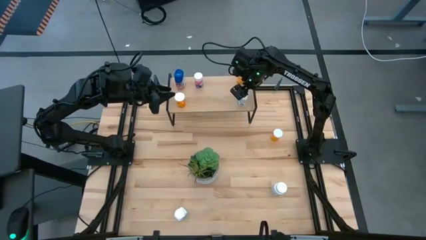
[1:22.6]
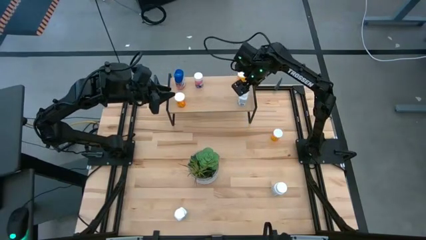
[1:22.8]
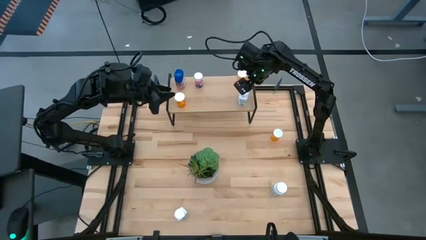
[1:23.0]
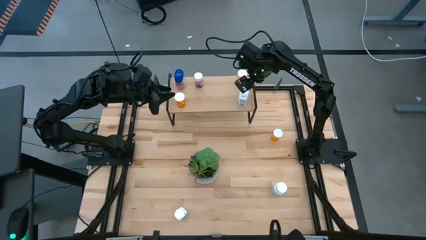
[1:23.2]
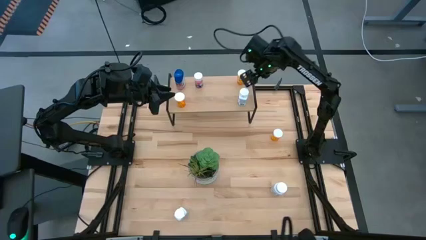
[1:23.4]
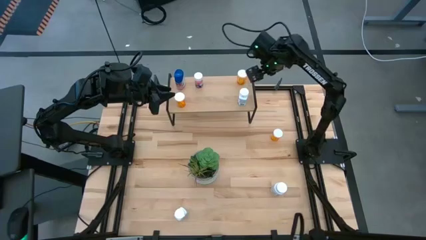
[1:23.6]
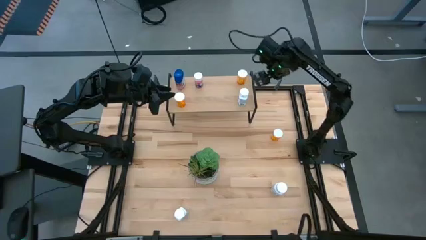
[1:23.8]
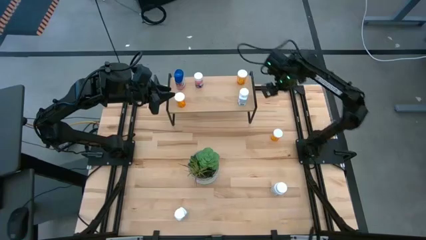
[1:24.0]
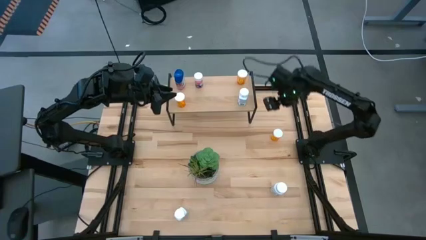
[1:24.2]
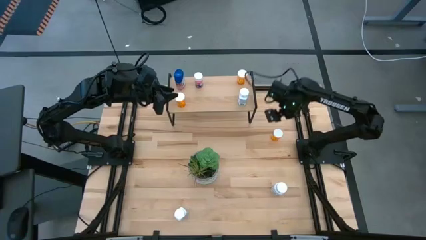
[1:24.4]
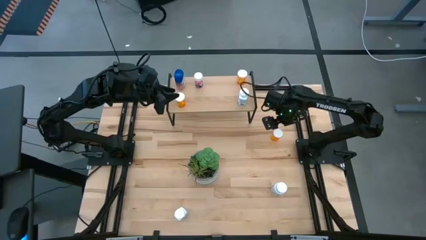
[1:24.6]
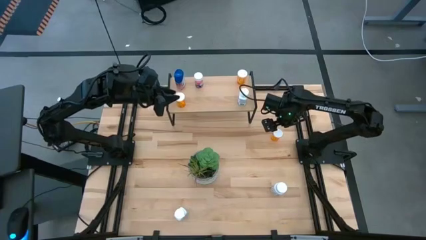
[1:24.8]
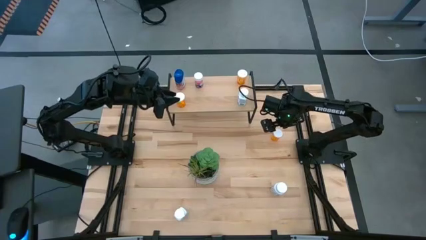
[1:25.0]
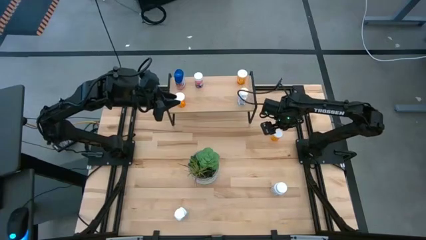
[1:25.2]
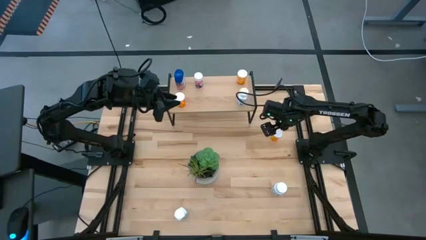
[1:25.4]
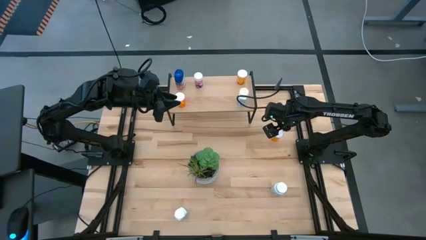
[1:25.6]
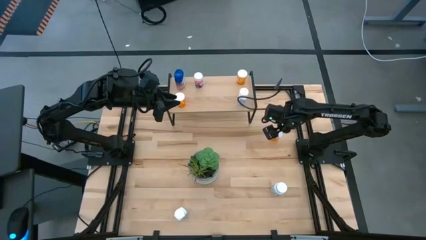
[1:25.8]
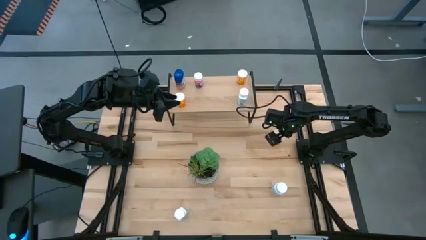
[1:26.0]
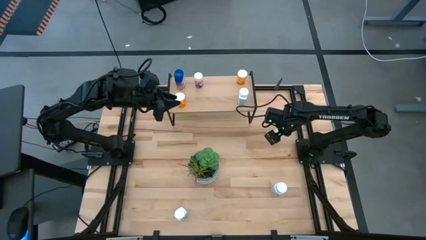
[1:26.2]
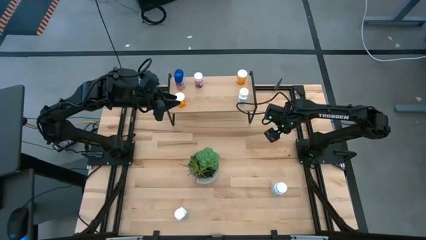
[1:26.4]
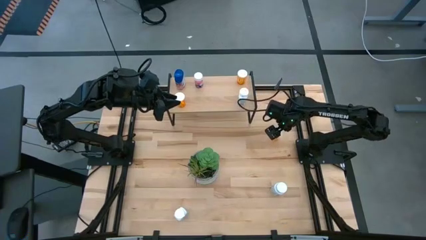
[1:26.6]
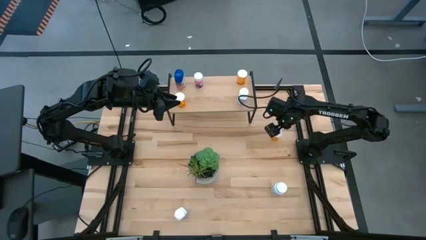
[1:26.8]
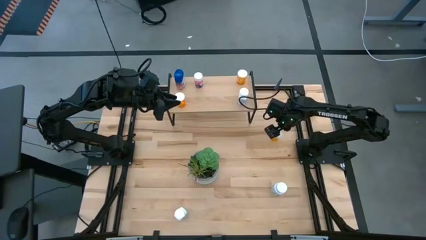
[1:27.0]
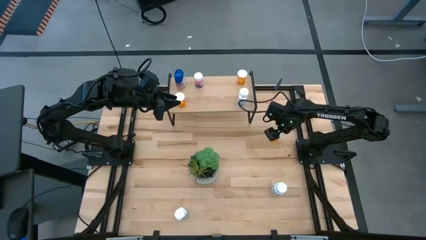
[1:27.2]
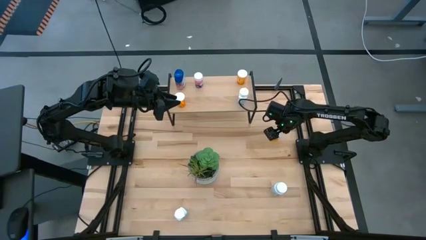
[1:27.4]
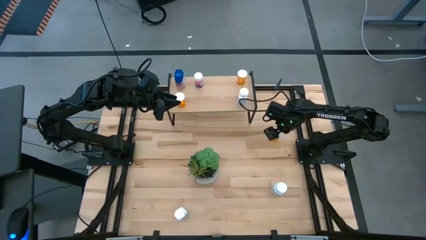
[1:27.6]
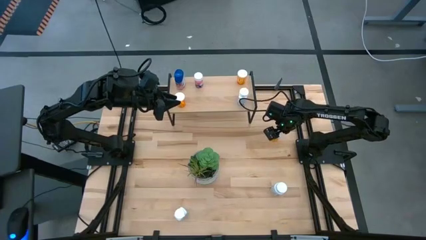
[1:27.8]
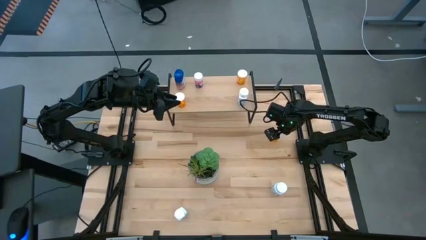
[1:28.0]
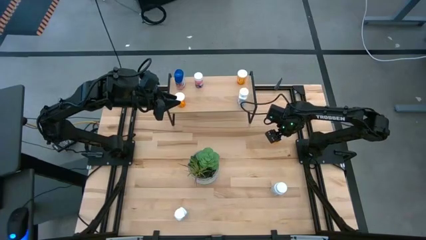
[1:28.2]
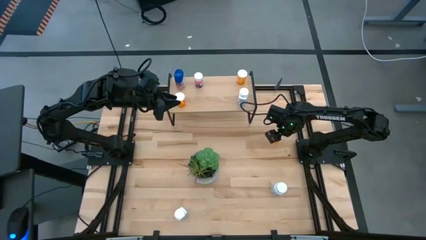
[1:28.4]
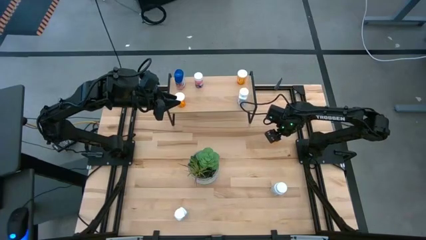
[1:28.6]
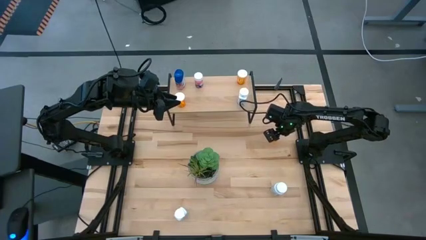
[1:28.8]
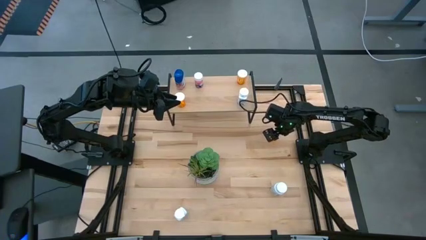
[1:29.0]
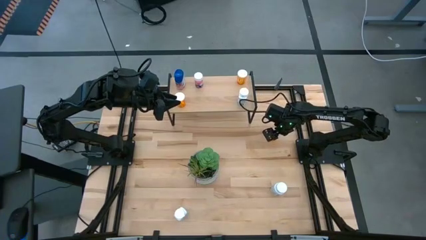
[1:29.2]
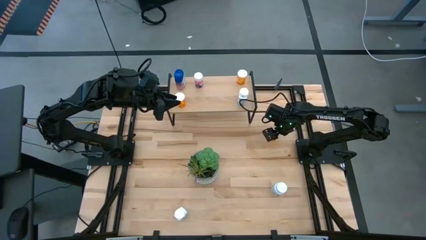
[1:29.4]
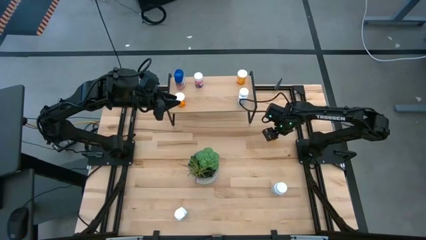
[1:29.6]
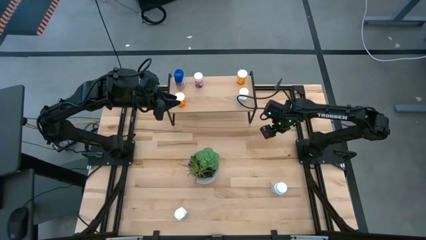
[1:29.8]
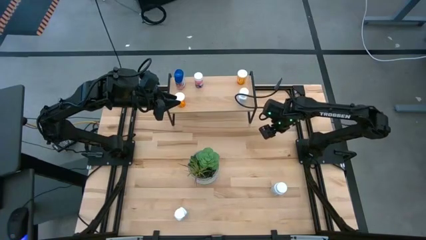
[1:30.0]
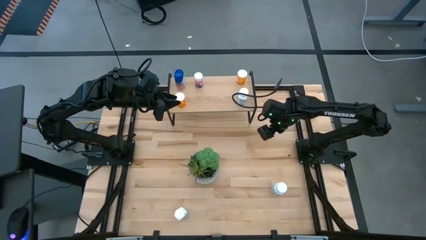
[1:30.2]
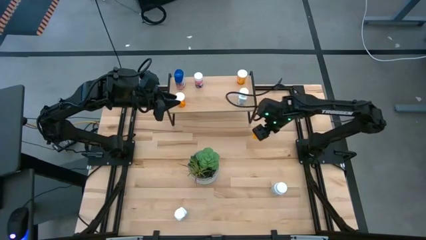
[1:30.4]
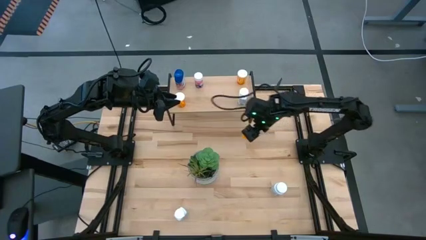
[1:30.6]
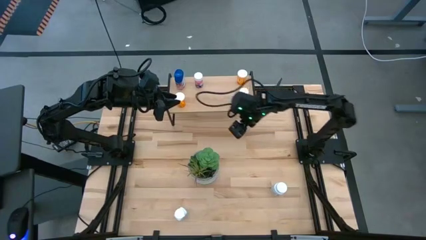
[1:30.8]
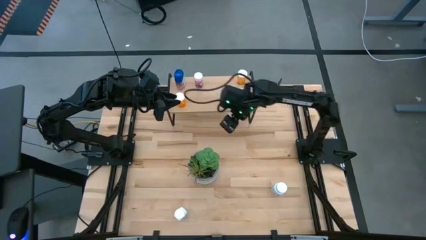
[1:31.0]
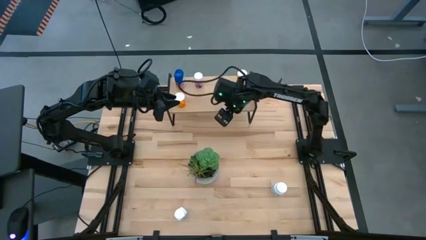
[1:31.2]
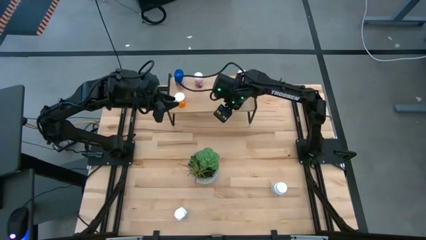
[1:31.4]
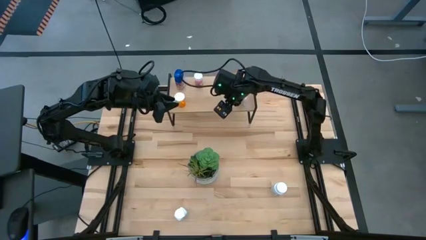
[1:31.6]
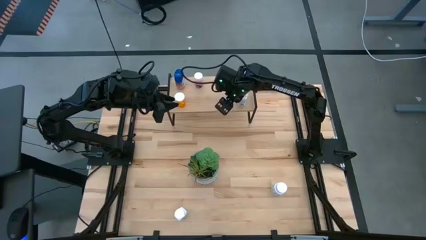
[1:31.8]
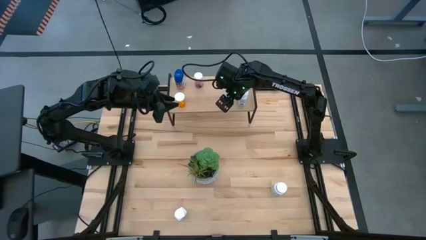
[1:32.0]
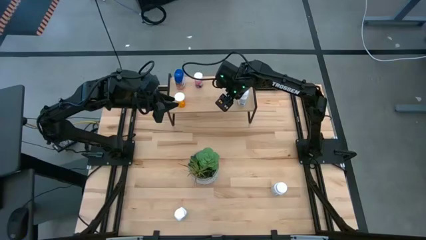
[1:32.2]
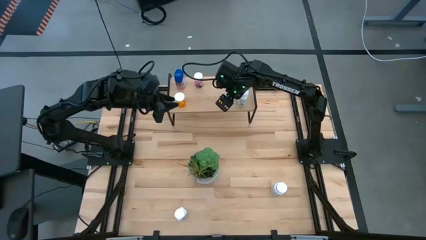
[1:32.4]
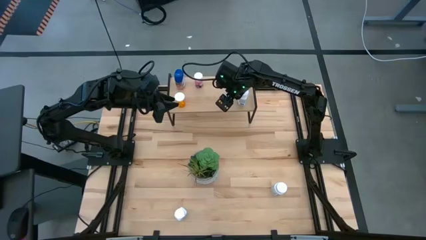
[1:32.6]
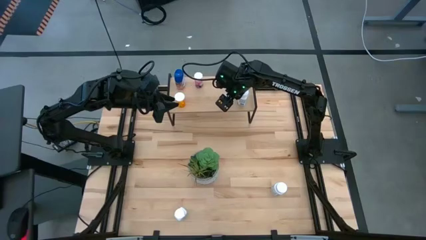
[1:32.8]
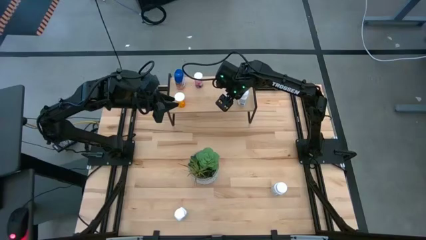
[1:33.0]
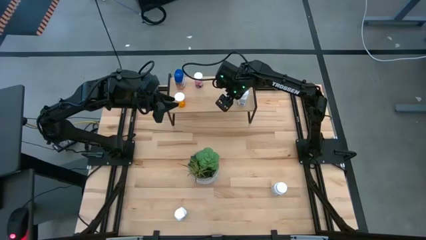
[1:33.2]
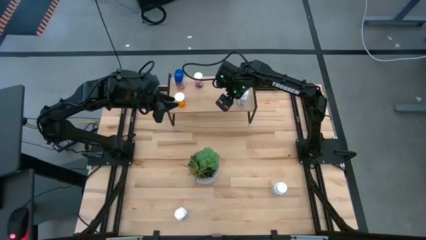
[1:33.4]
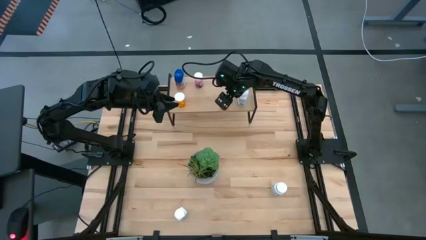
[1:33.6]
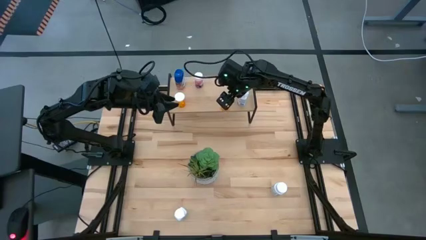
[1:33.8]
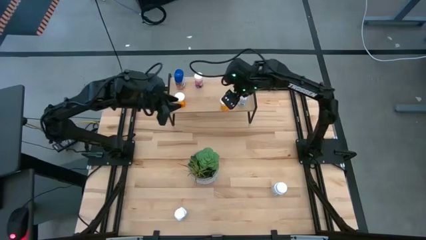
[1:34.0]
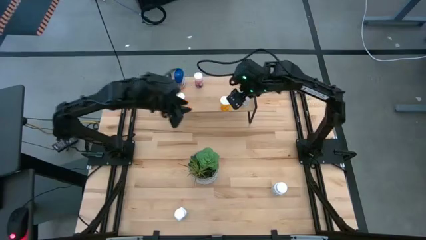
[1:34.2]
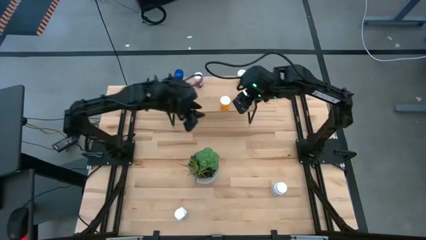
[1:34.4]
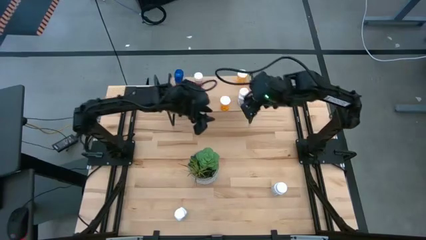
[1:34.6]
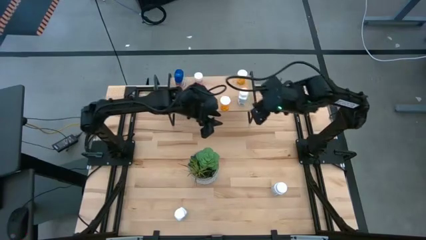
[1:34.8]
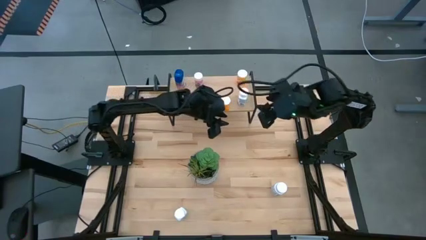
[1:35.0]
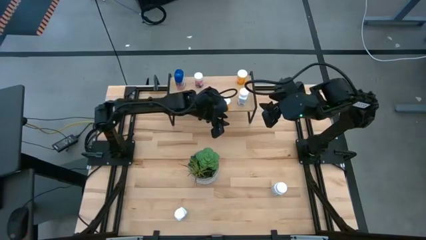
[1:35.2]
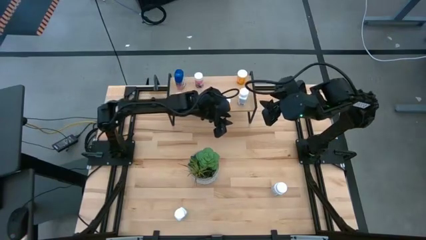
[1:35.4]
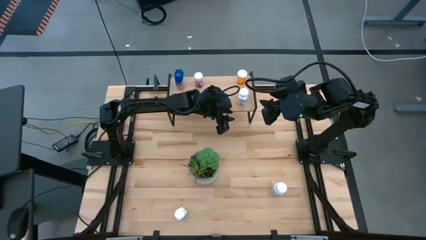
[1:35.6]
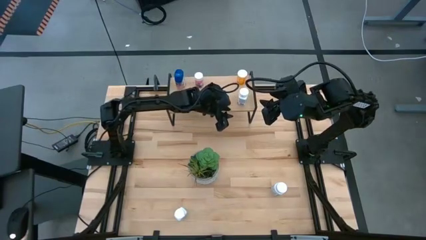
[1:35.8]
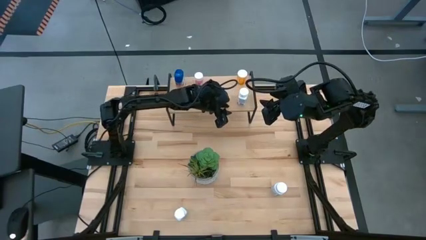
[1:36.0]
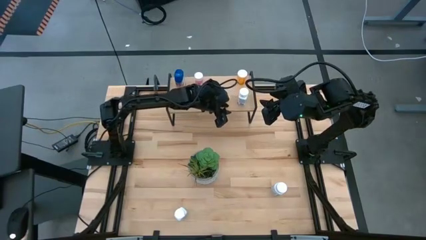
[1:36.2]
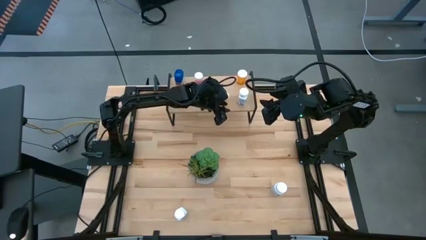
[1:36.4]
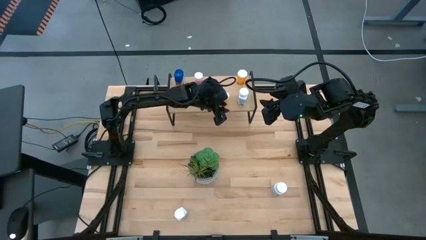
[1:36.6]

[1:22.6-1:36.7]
Task: Pick and place medicine bottles onto shelf by color
Put the orange pill bottle on the shelf
